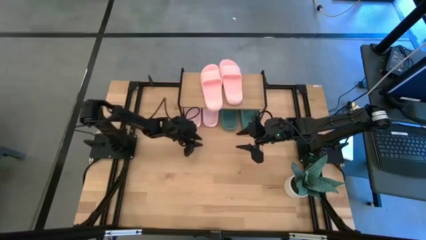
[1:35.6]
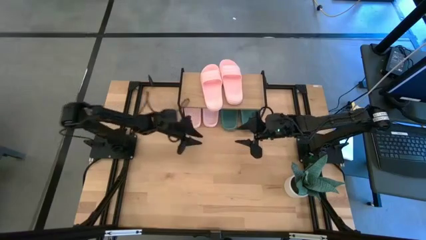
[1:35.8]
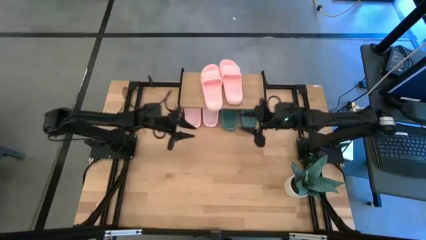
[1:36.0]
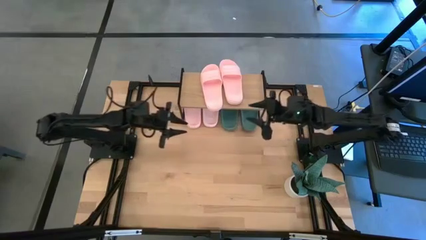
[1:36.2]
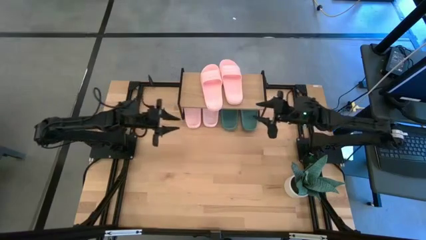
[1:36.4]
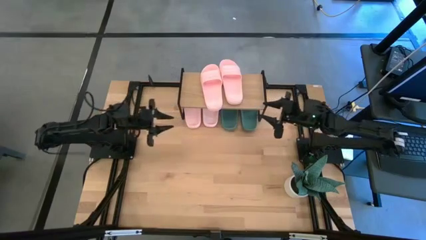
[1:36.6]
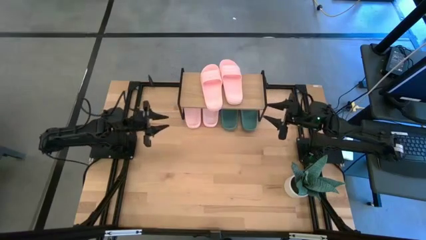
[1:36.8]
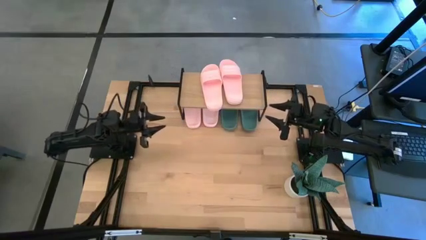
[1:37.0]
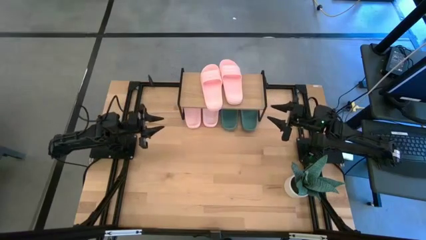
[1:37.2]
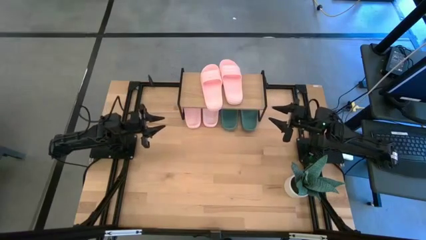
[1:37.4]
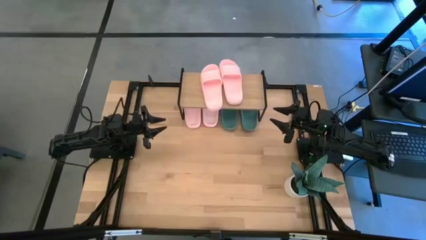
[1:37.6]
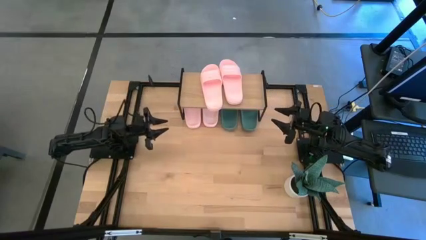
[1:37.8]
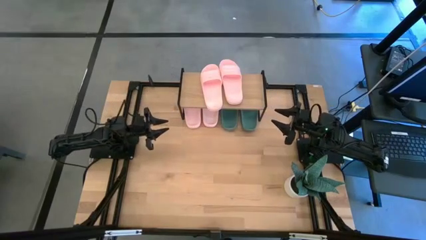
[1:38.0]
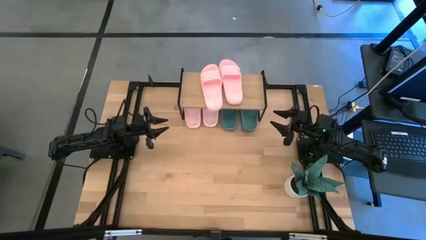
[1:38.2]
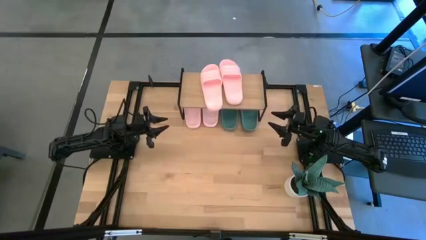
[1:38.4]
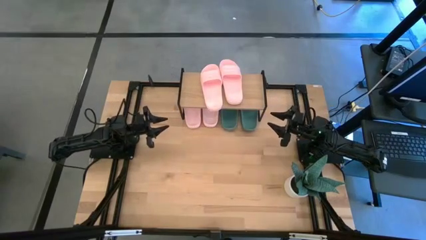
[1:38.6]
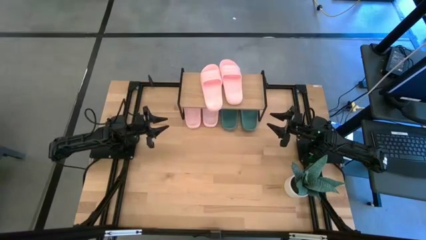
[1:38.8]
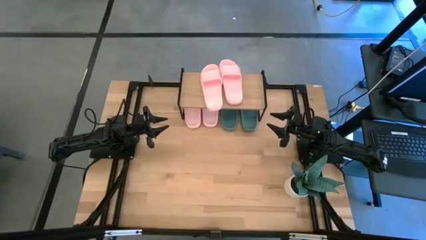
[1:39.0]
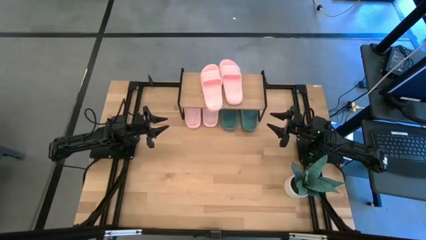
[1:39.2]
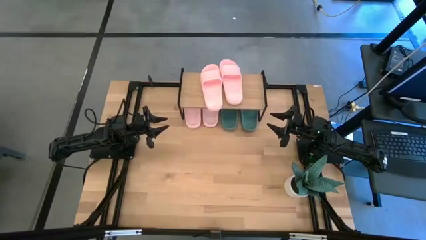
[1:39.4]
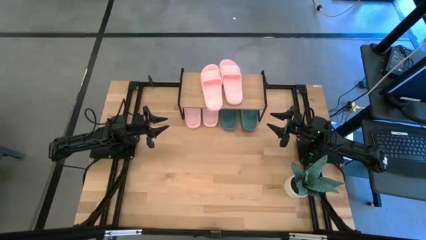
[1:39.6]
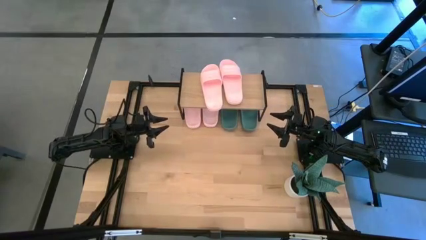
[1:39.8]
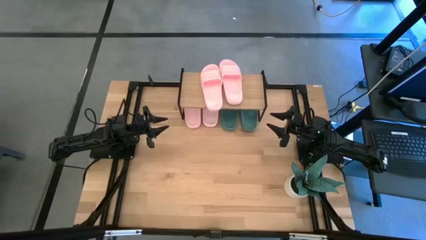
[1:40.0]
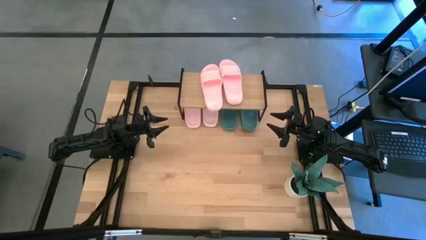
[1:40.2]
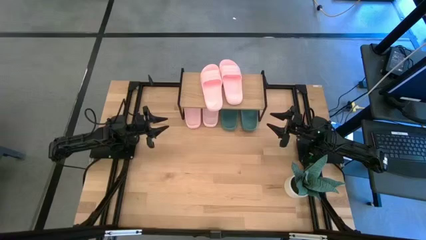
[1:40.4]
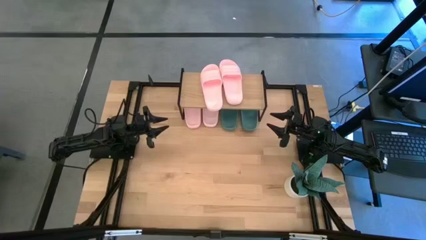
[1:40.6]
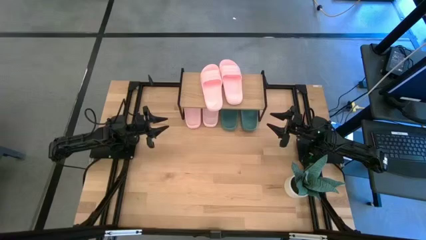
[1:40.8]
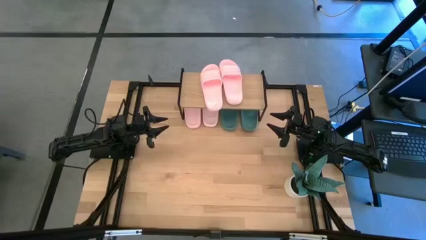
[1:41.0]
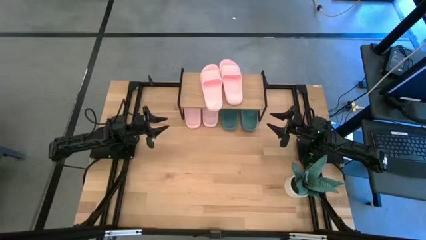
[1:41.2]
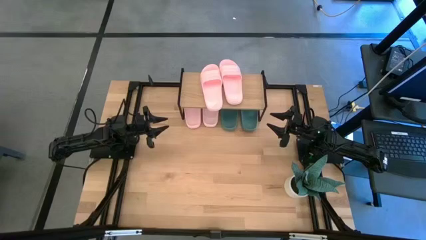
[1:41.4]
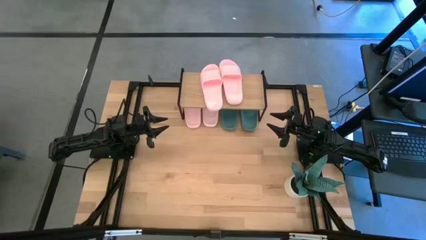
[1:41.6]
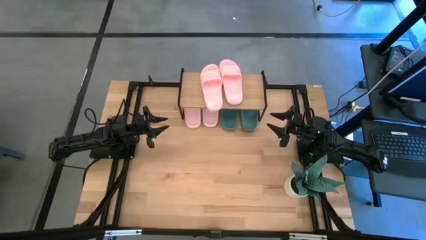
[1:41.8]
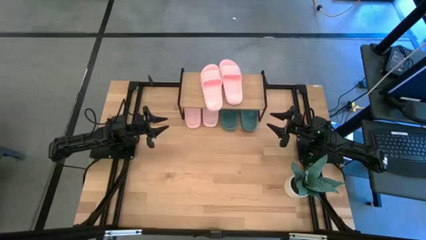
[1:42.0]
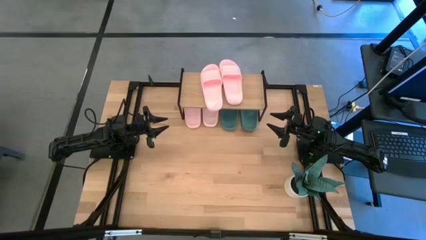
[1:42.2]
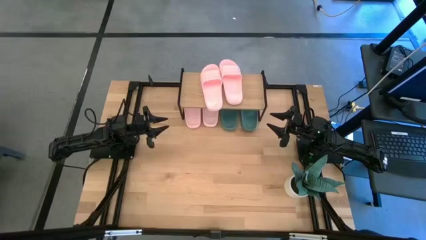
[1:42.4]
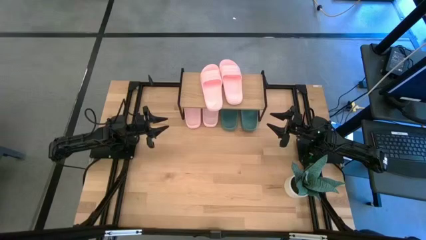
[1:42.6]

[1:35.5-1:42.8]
Task: Pick and place slides into the shelf
Return to Home Position
